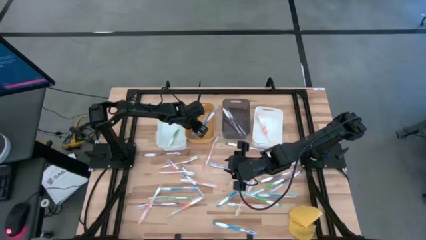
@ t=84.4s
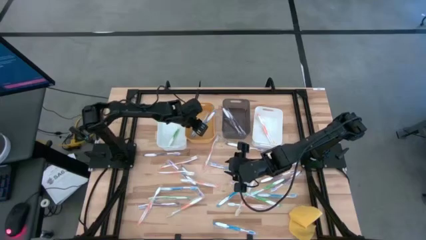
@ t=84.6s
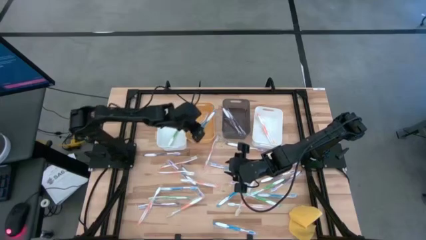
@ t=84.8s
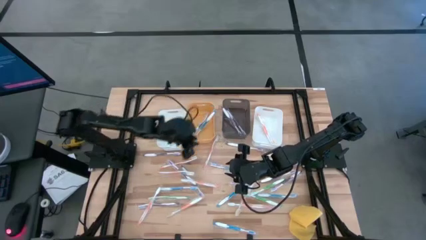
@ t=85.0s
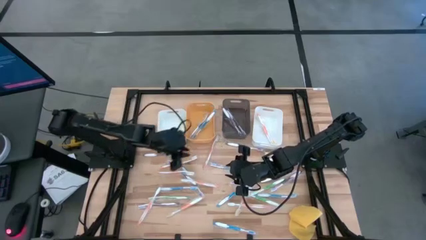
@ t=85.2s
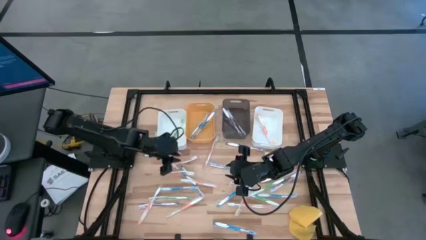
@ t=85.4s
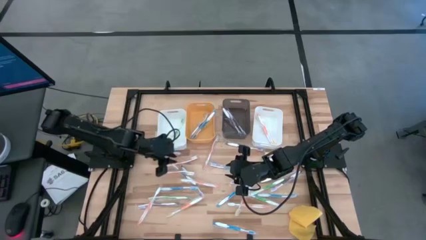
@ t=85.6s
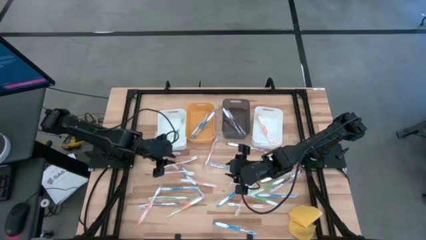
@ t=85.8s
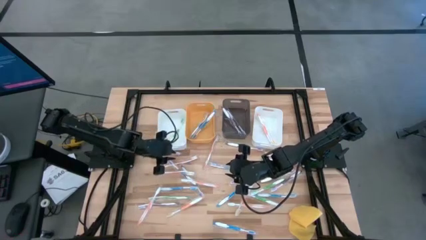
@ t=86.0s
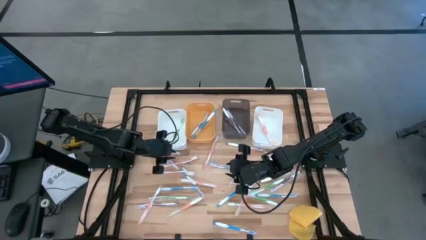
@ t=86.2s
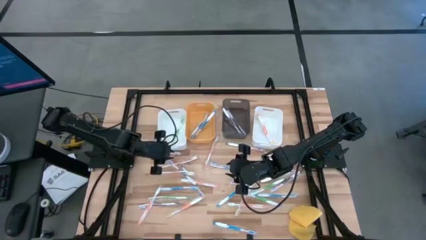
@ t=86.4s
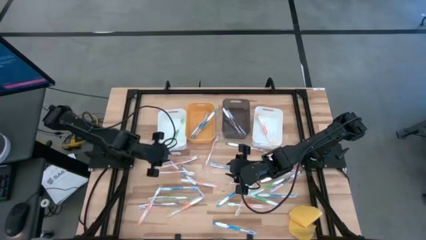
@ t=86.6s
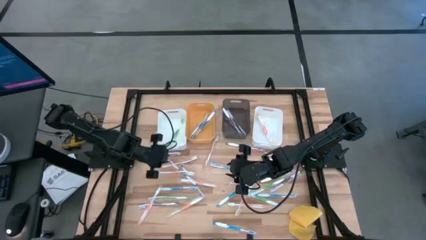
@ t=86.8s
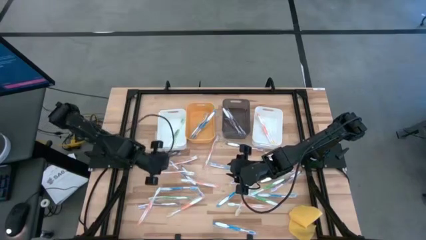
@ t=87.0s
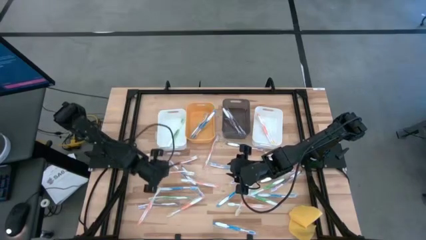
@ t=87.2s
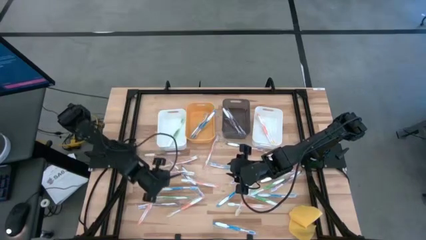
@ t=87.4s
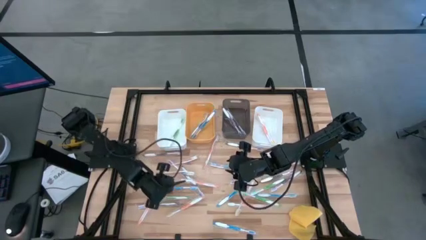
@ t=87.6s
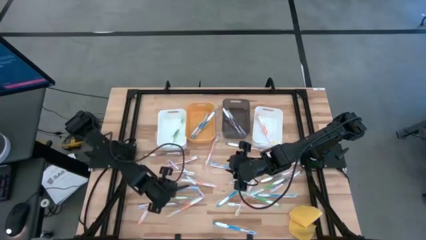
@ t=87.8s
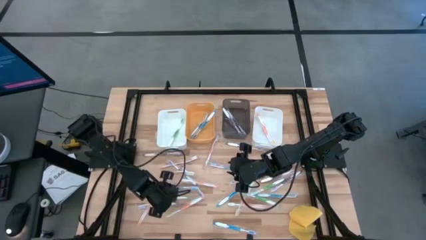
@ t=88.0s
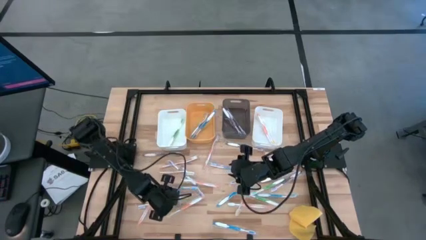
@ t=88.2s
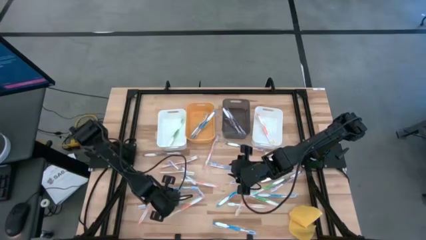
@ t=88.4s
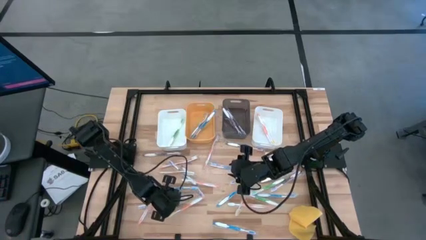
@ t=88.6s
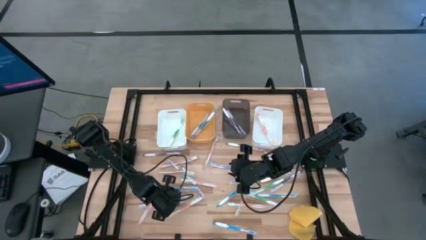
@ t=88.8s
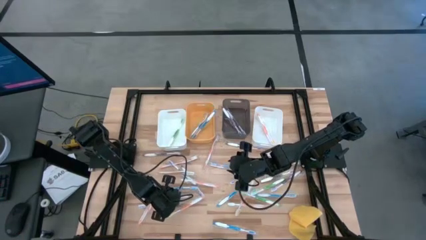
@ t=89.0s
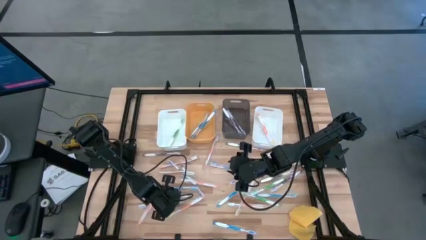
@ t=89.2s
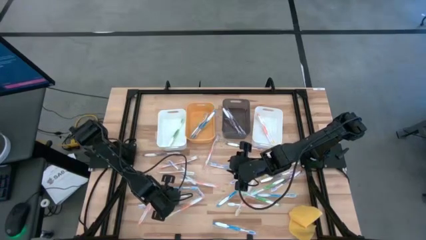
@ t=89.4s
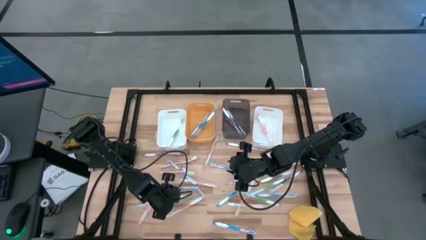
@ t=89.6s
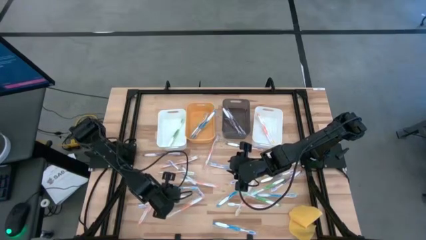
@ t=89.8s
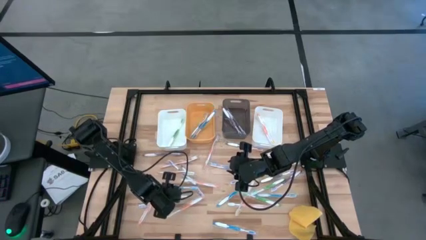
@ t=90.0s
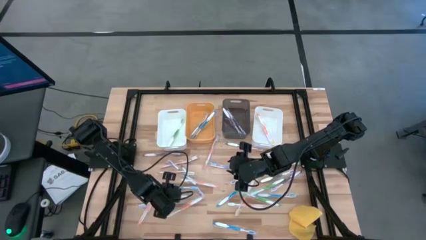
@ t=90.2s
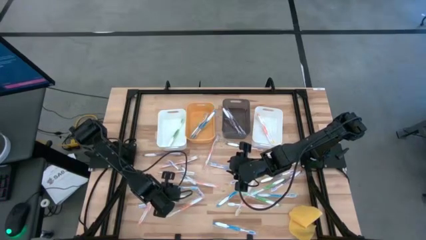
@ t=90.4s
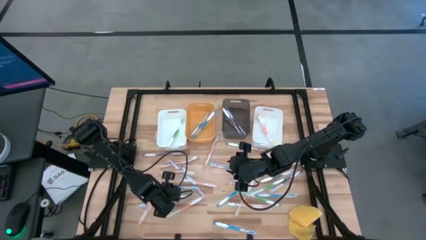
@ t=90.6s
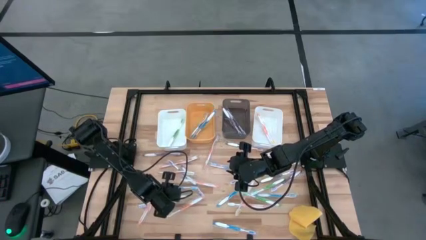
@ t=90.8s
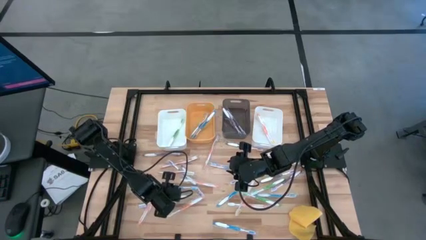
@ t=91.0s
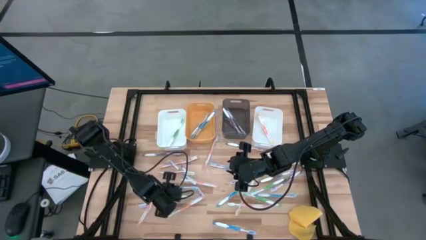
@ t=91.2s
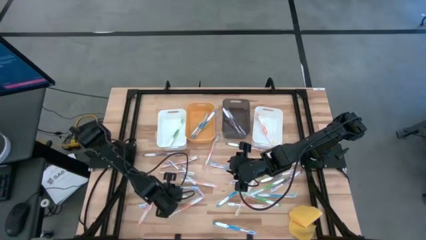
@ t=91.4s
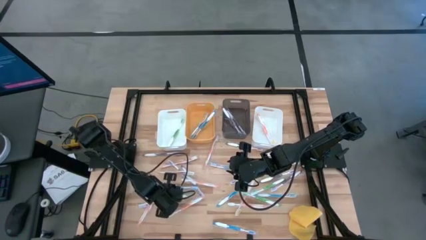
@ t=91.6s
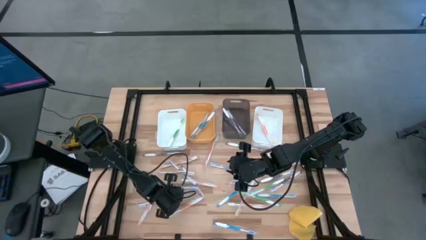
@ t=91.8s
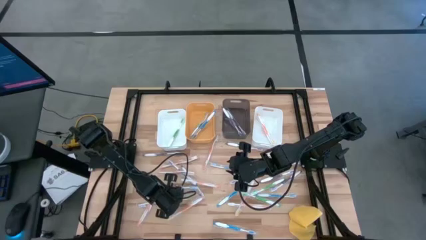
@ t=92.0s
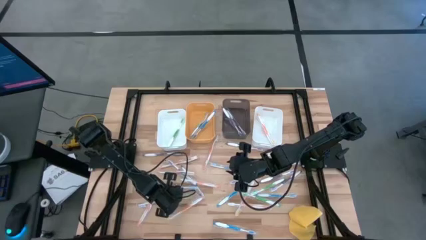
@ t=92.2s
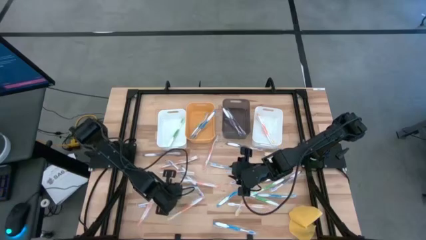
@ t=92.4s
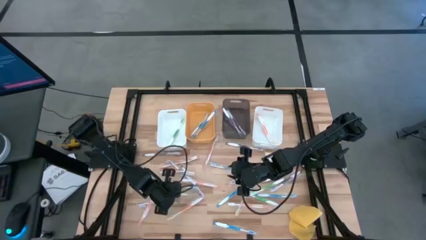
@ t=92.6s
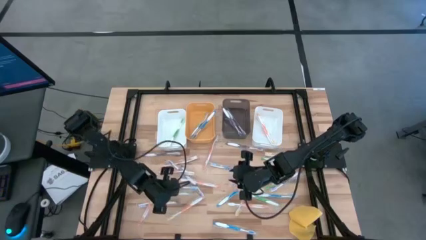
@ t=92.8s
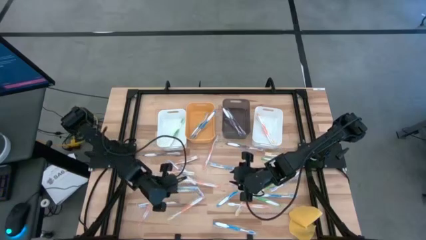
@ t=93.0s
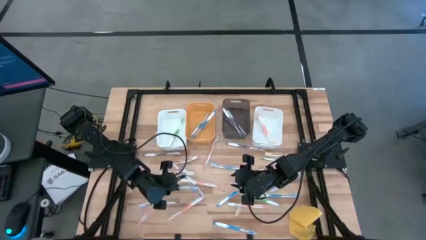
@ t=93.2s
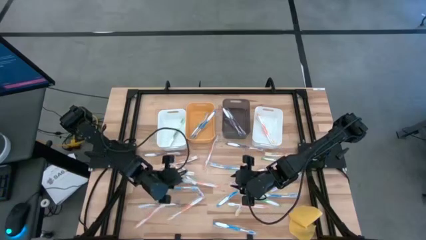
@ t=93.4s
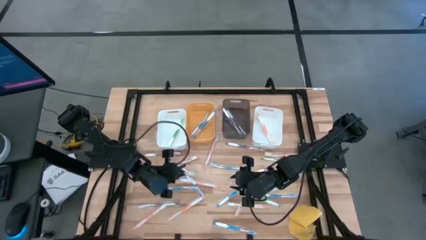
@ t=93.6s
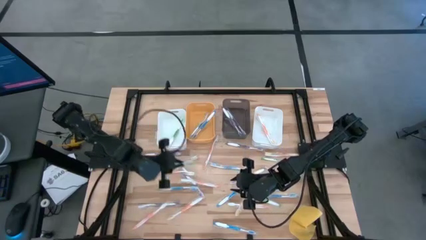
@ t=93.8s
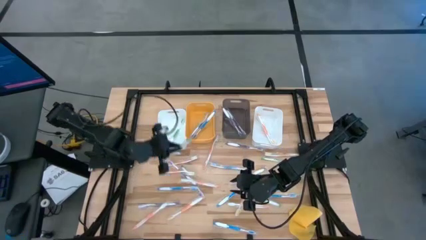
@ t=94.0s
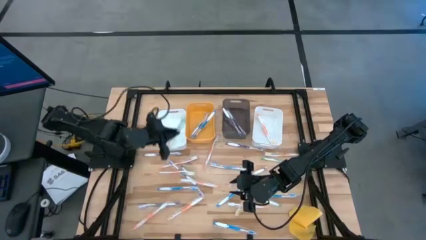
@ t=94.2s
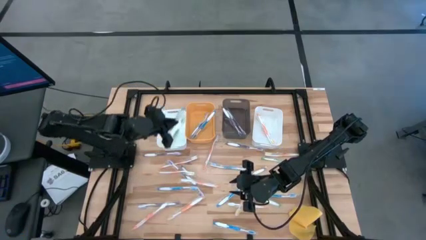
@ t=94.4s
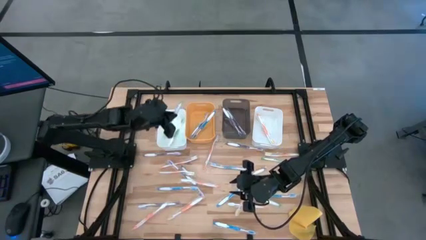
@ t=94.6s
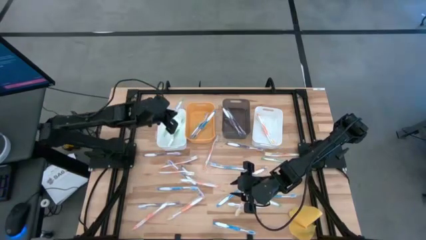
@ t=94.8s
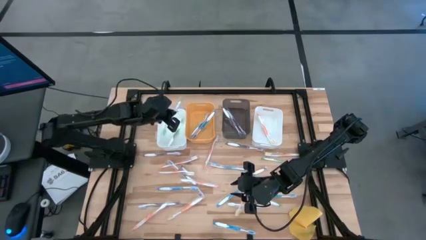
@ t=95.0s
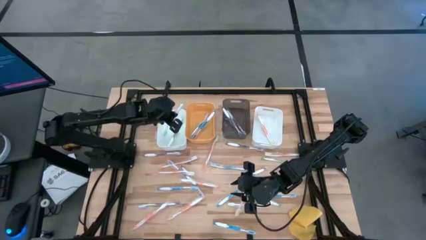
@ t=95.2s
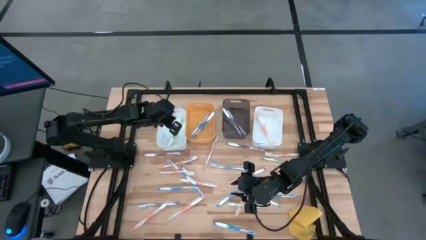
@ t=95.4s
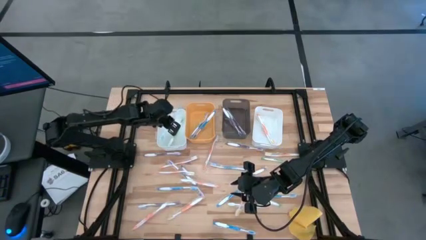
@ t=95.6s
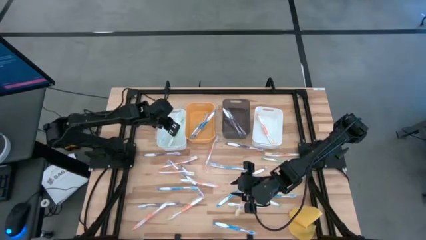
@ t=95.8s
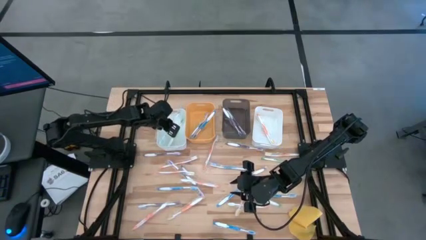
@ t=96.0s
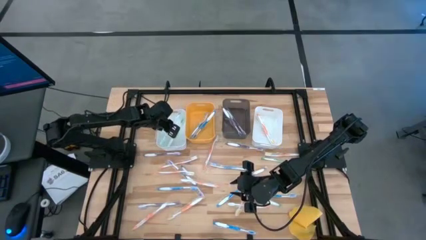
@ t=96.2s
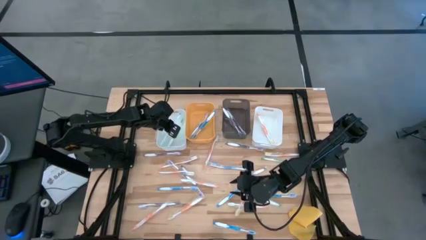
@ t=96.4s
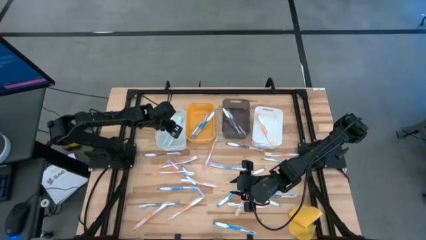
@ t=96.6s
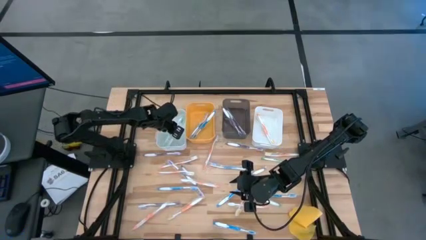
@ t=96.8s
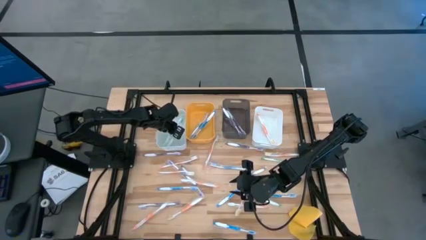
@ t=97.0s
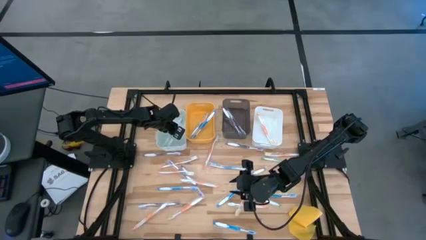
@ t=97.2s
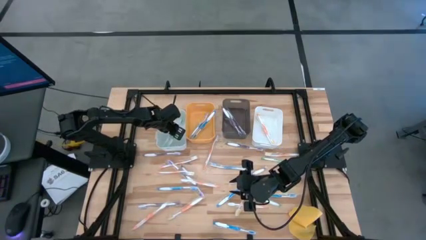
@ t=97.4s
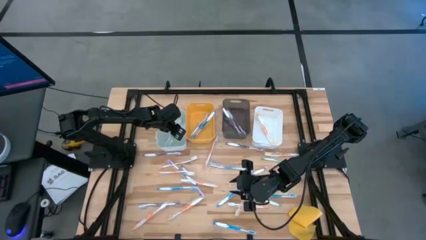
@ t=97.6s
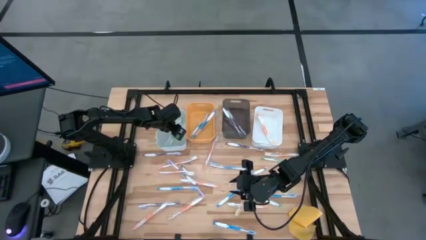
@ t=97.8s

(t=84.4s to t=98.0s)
Task: Pick & Place Toothbrushes
Put the green toothbrush into the left white bin

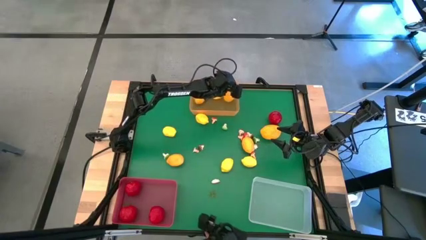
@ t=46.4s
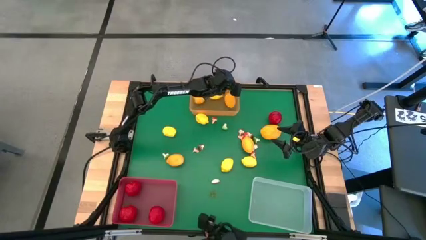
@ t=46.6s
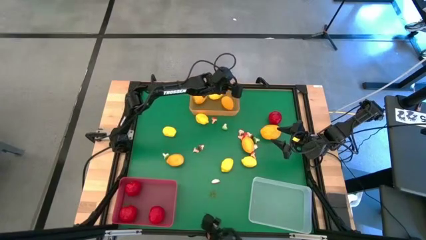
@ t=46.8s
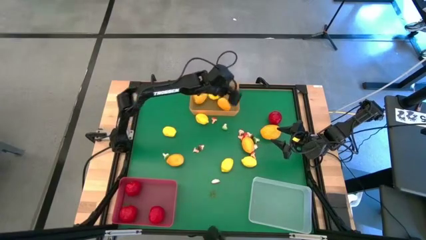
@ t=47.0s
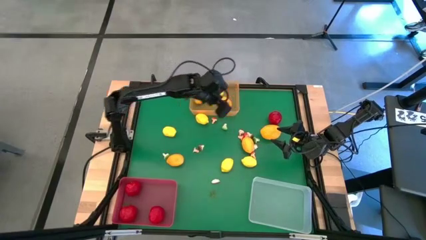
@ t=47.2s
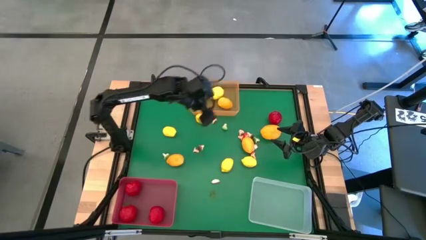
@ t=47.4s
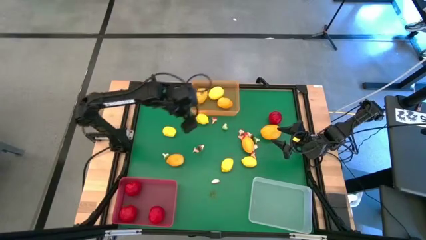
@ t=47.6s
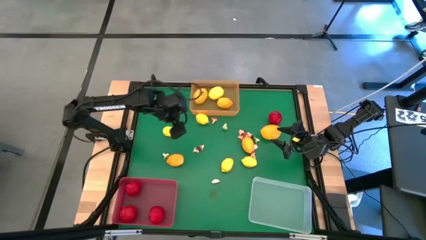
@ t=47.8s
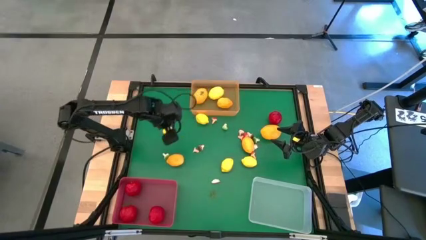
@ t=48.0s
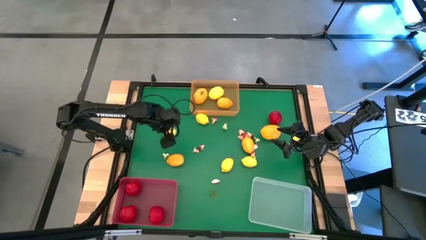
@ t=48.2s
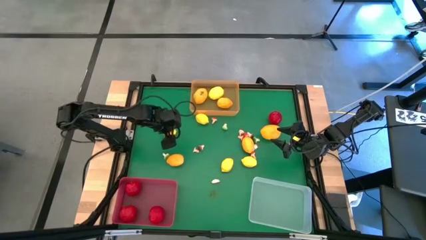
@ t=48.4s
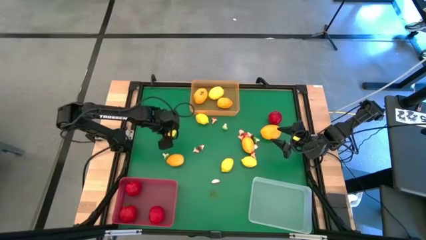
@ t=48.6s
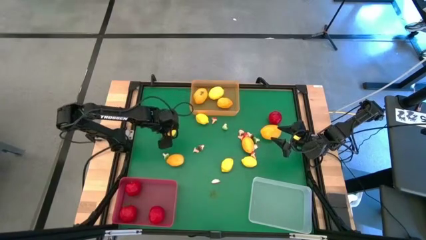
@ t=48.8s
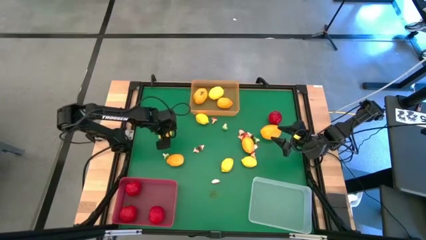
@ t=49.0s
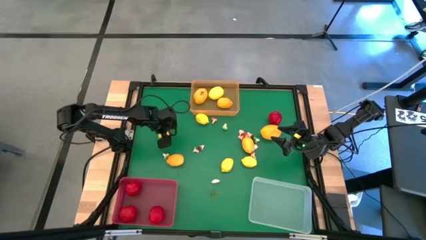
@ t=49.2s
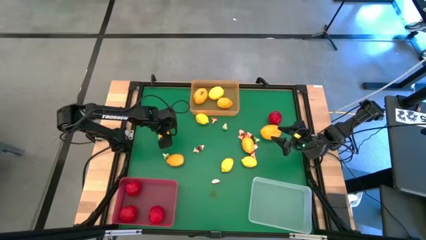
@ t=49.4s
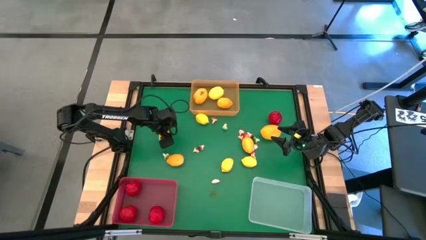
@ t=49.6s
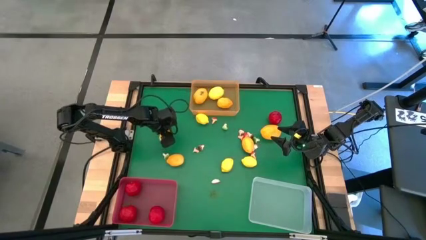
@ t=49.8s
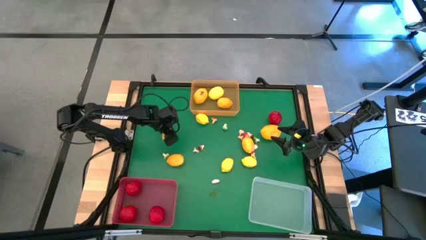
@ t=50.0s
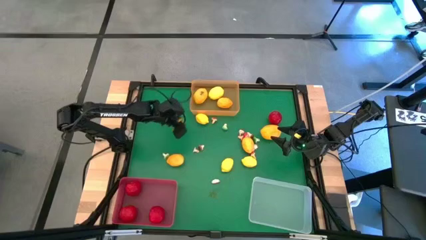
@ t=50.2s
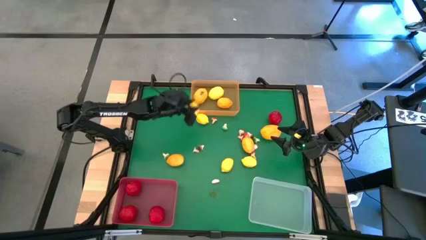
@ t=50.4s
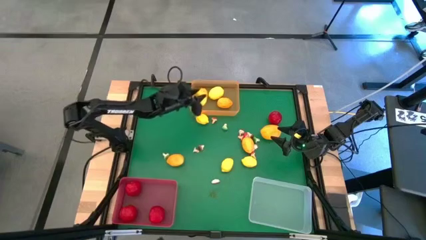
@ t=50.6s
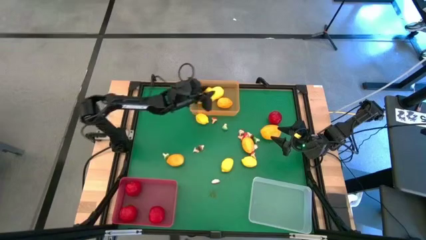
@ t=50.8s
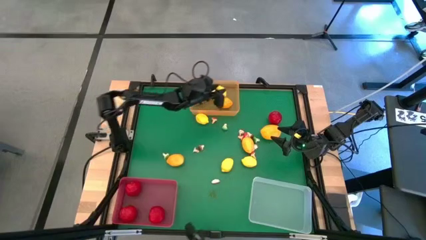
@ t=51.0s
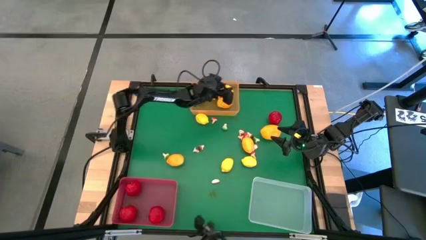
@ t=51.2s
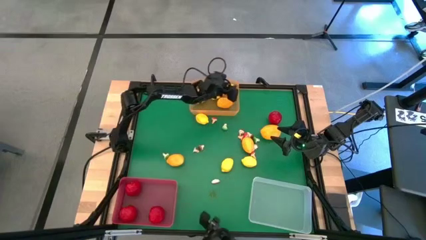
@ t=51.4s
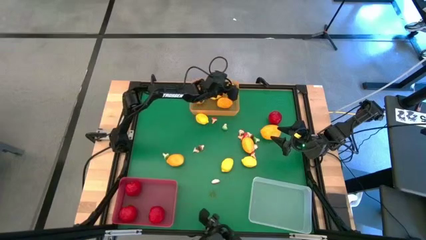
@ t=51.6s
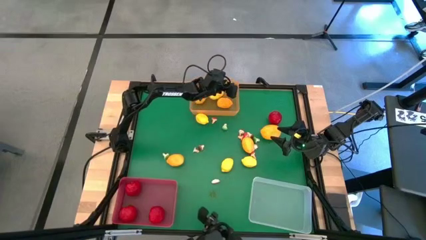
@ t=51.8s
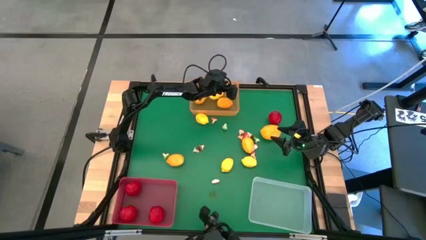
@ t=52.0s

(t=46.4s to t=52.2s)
Task: Sort produce into baskets
Put the lemon into the orange bin
